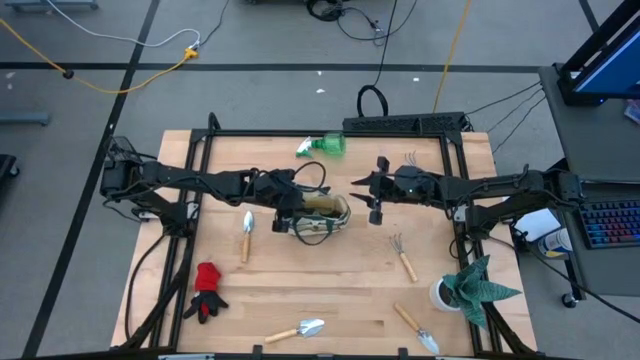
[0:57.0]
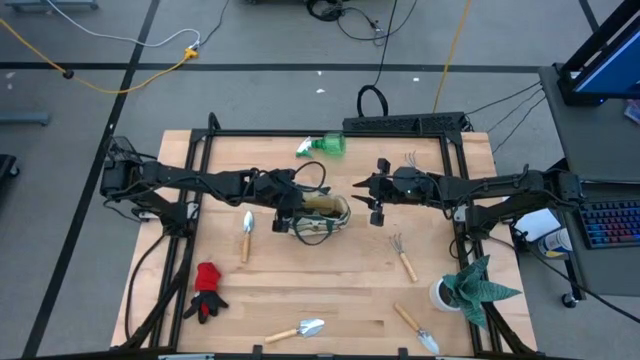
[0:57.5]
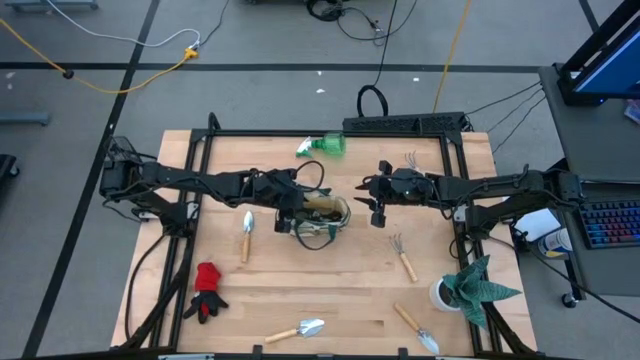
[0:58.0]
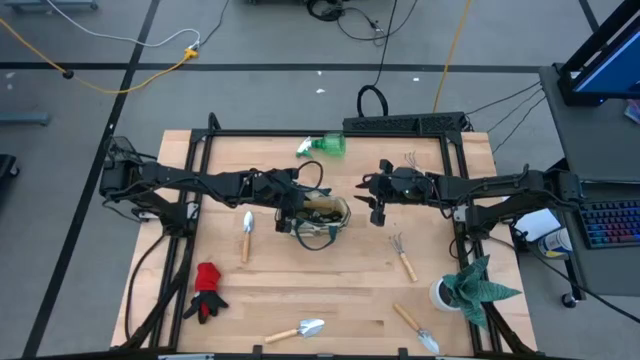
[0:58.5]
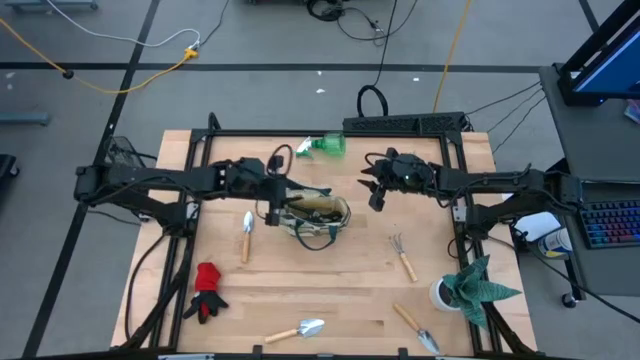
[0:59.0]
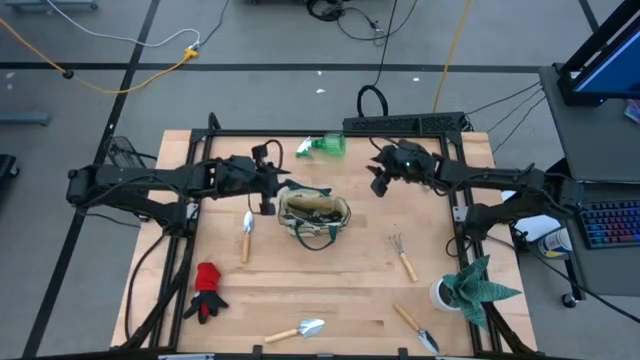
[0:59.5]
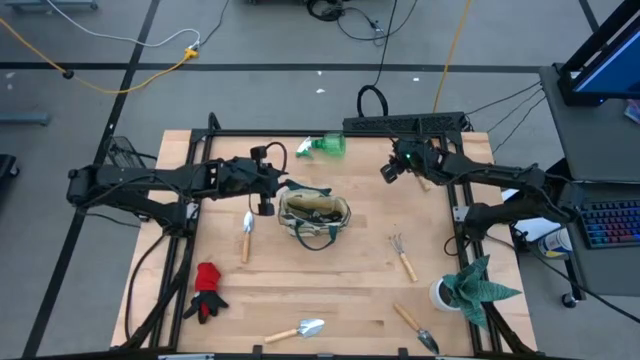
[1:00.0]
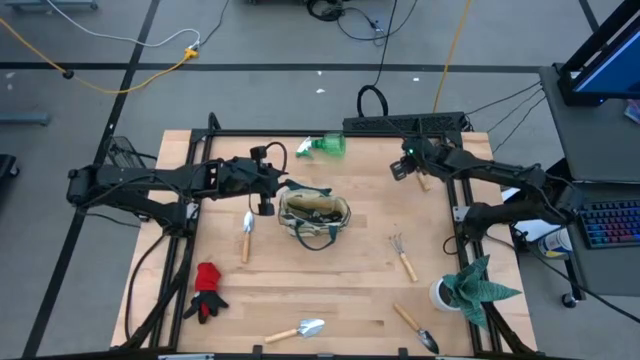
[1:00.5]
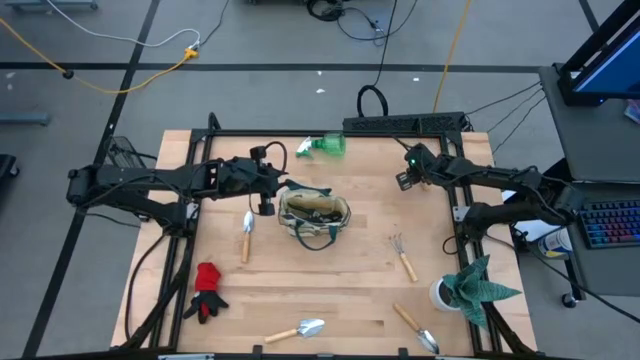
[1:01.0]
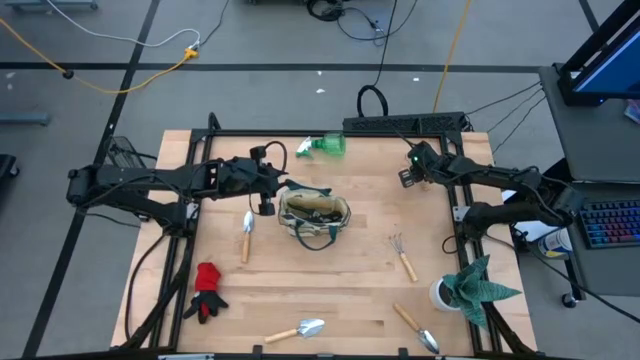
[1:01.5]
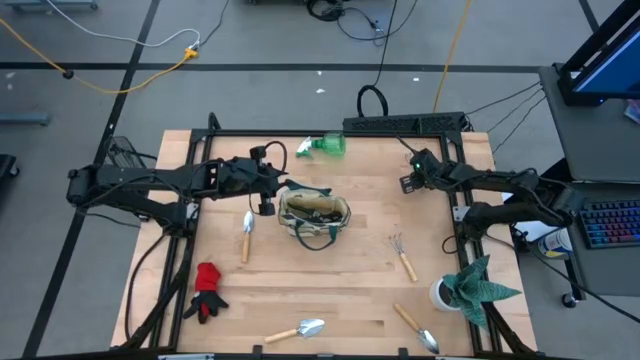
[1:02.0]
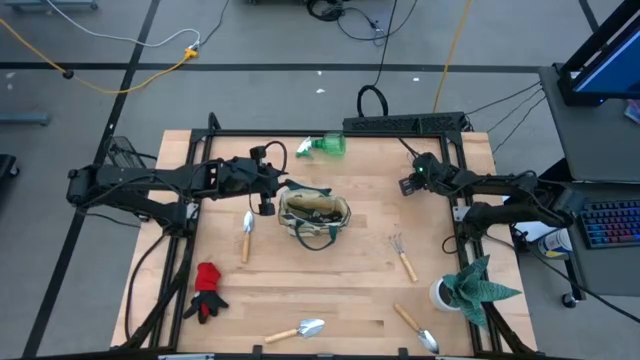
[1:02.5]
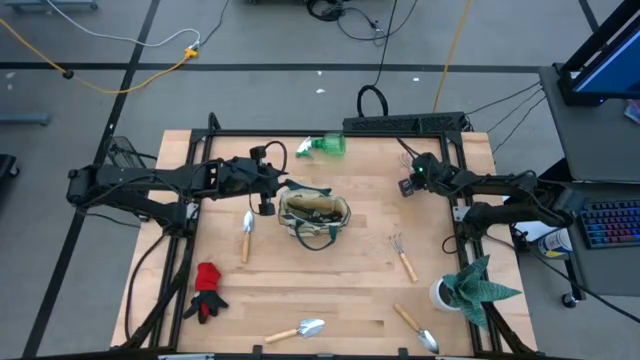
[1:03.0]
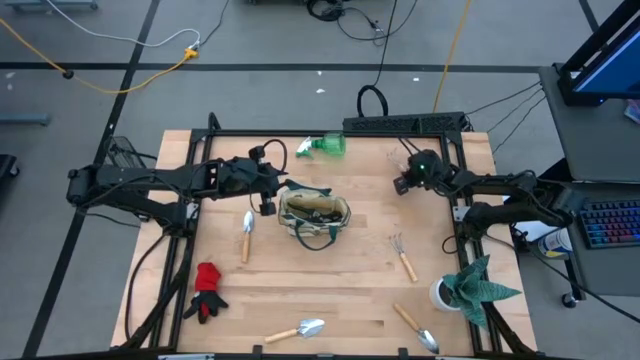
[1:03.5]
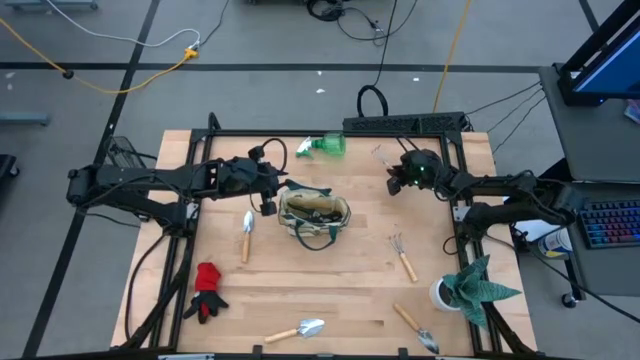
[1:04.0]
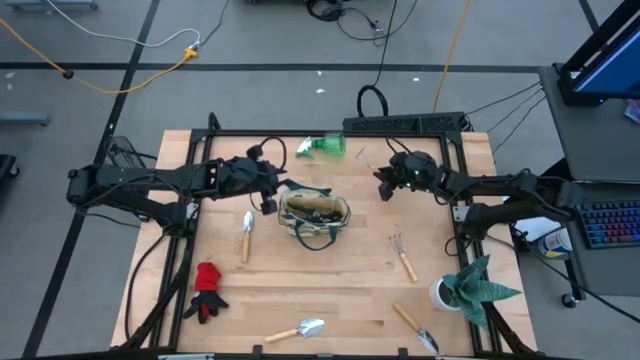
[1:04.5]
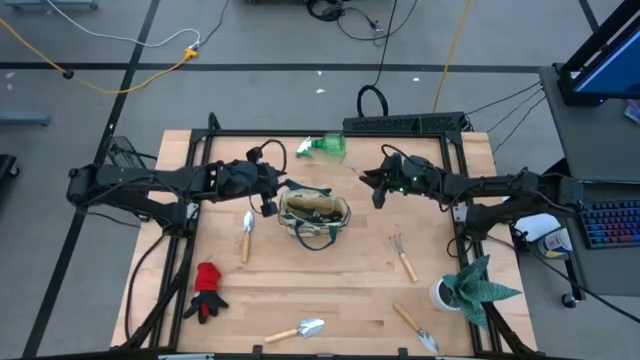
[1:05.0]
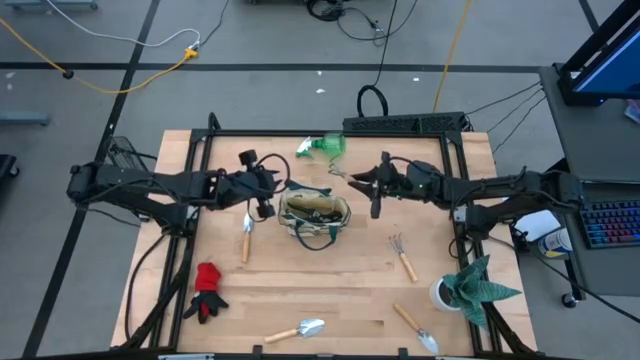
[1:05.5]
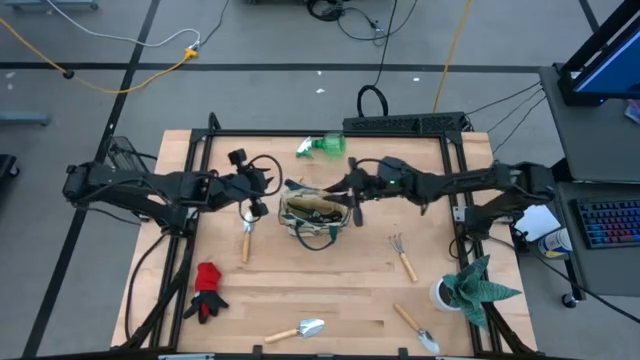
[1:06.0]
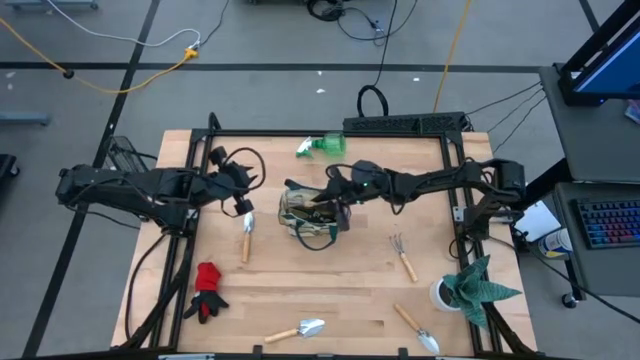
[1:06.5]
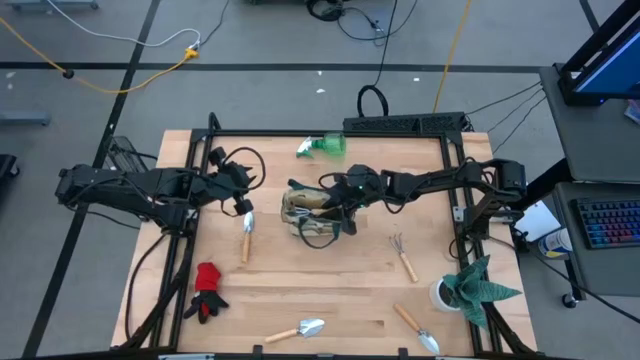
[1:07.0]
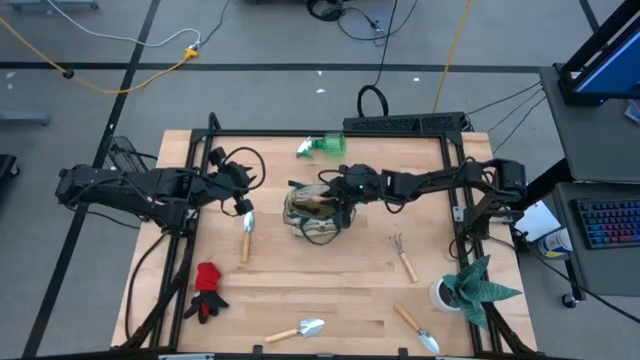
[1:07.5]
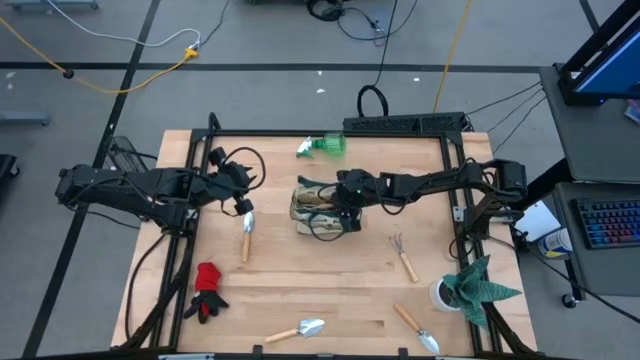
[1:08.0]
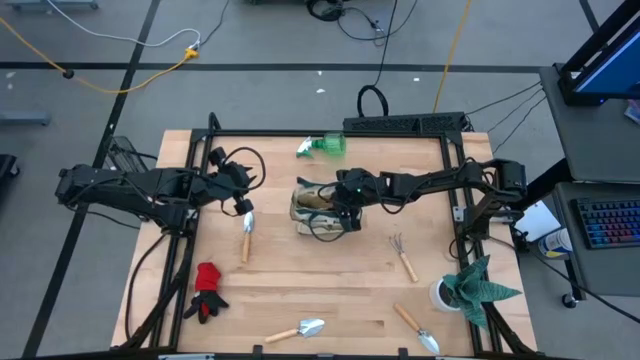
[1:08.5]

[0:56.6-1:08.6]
Task: Pick & Place Garden tools in Gardening bag
Put the top brown hand rake into the brown gardening bag

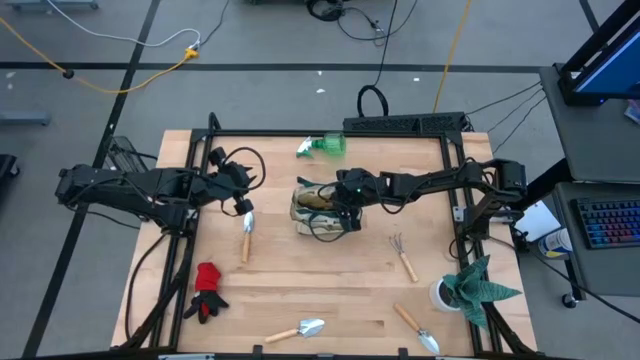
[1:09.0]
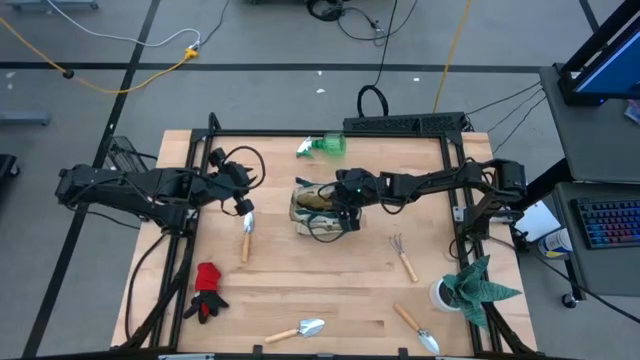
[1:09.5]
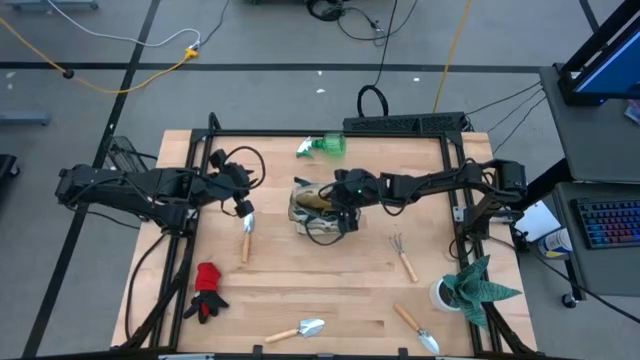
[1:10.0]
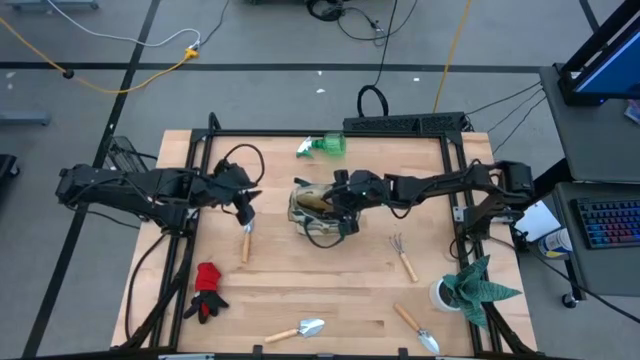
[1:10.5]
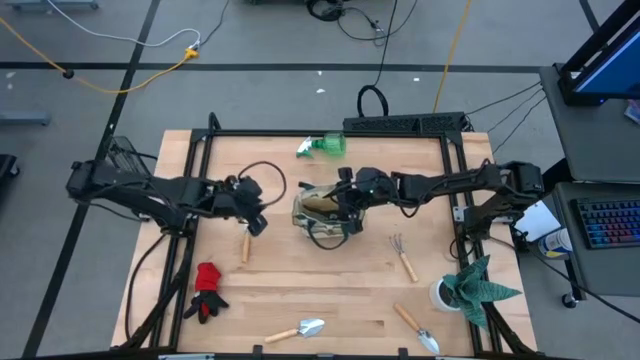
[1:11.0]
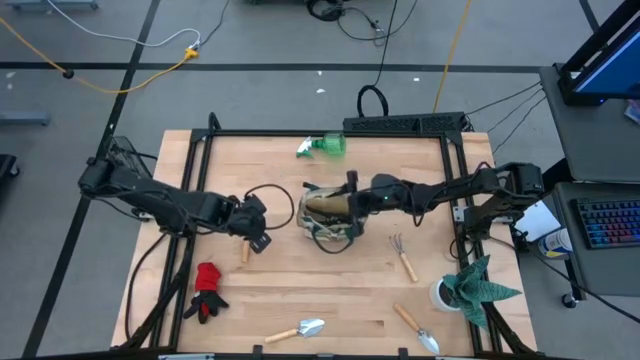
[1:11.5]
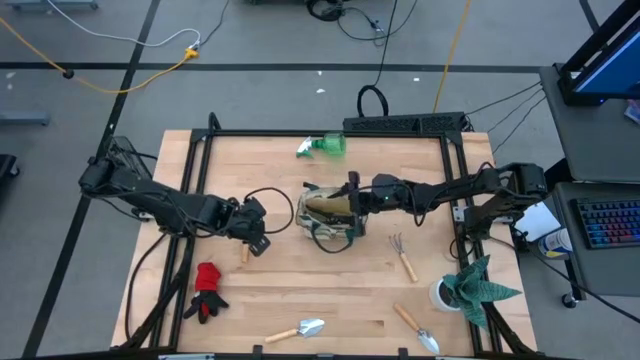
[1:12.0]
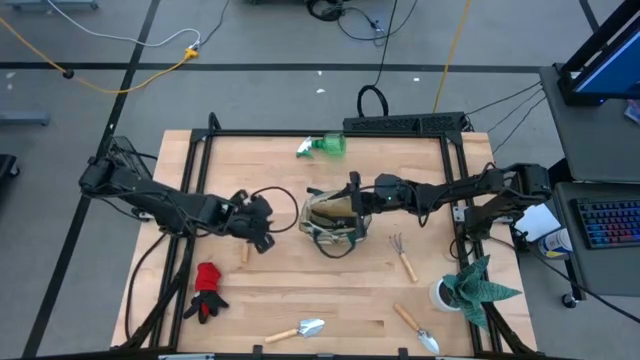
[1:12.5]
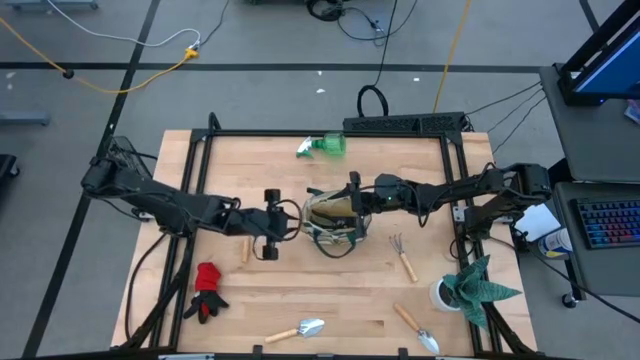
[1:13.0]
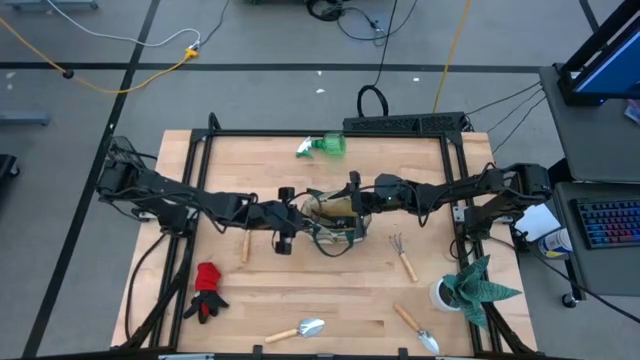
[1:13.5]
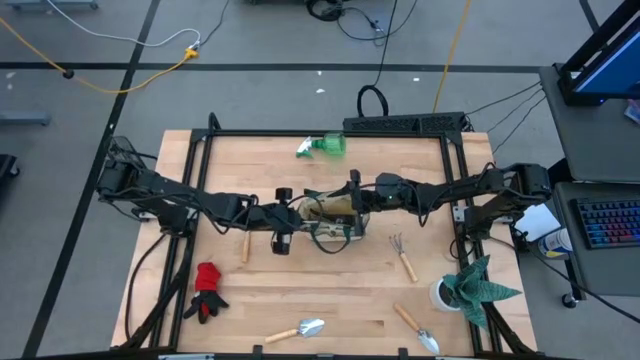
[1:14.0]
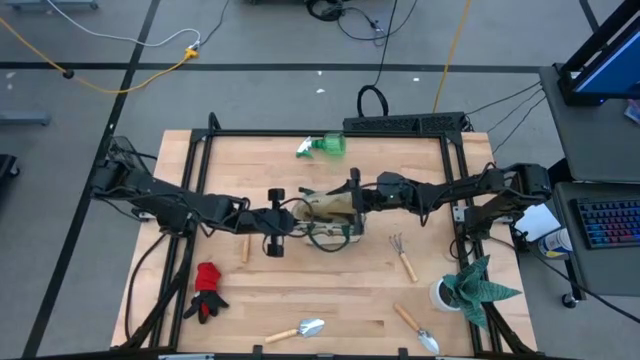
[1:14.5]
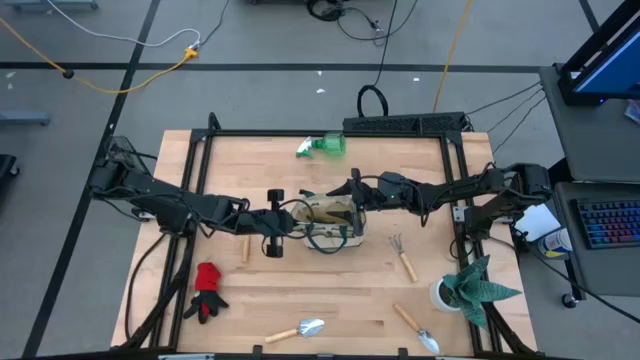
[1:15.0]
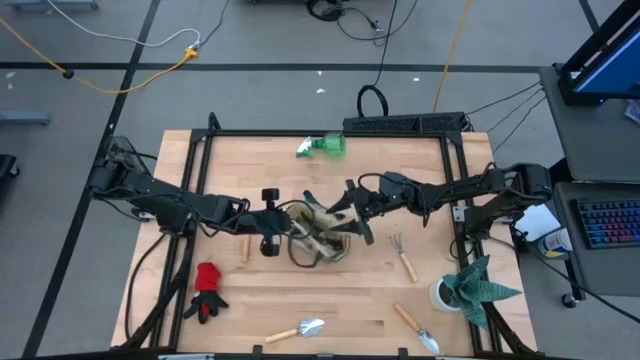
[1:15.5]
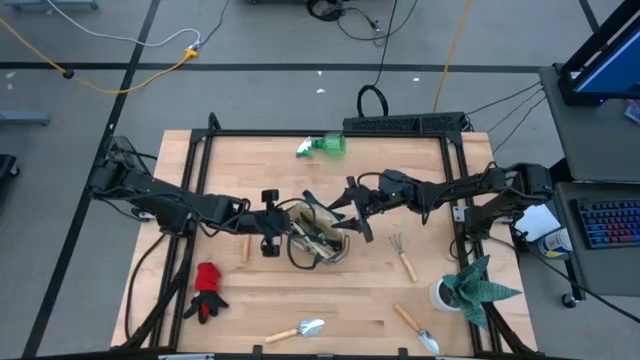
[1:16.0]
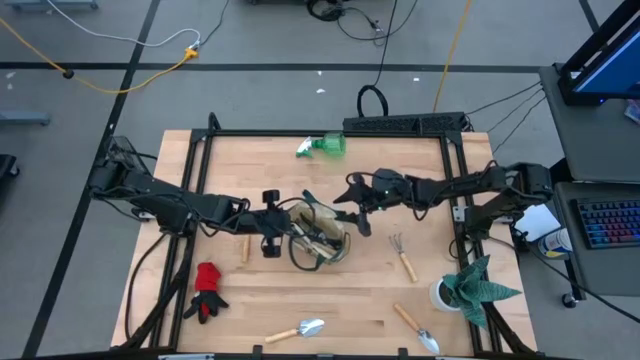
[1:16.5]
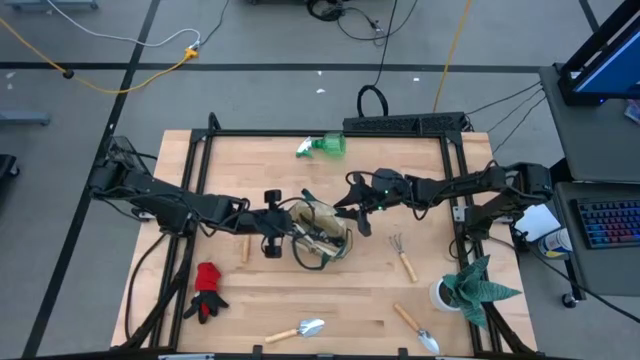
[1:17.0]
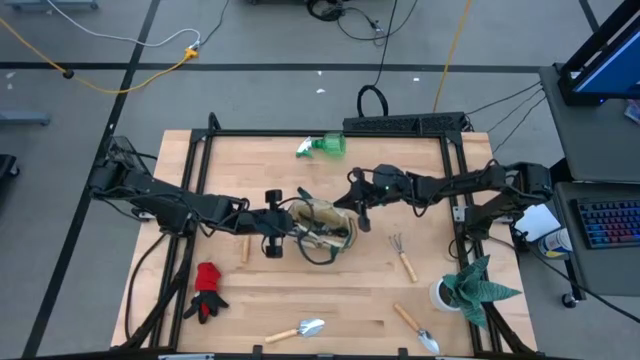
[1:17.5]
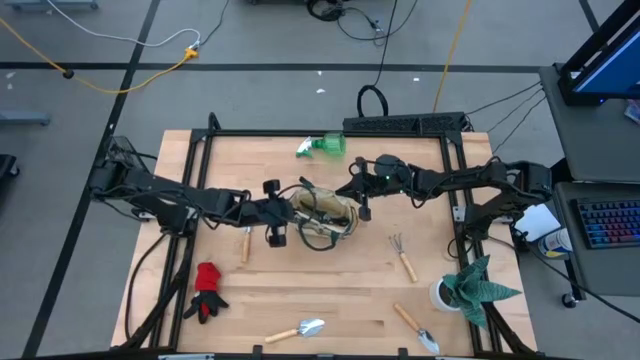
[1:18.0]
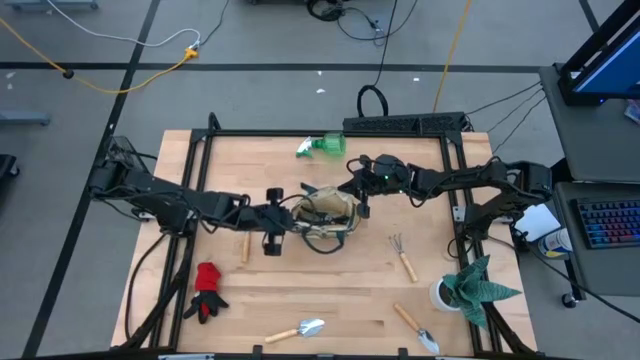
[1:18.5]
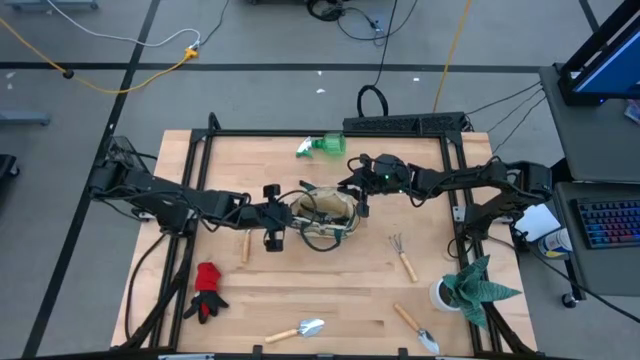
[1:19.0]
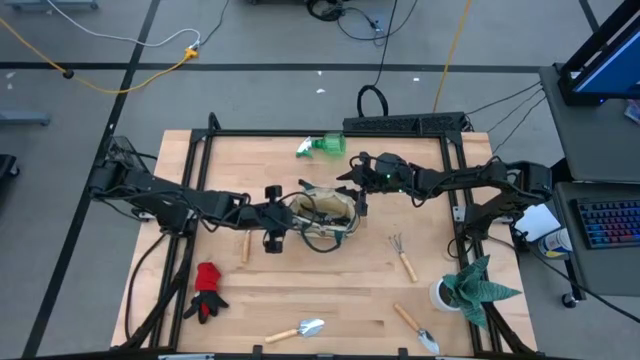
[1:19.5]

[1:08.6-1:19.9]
Adjust the brown gardening bag
